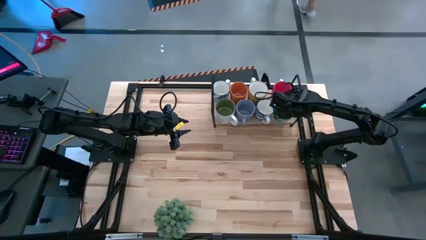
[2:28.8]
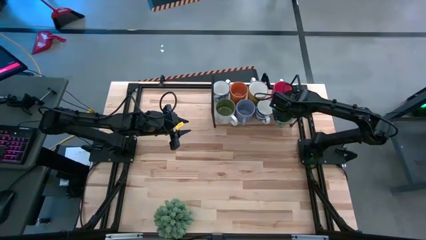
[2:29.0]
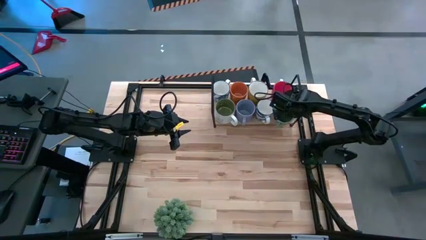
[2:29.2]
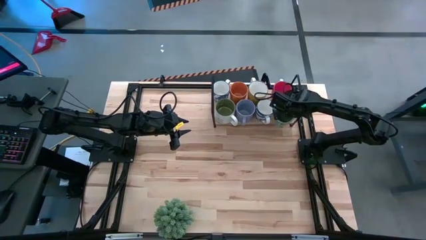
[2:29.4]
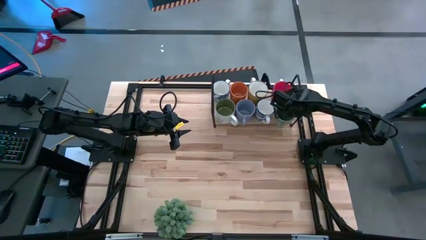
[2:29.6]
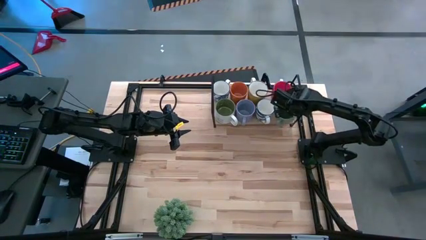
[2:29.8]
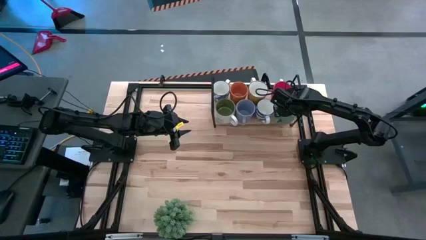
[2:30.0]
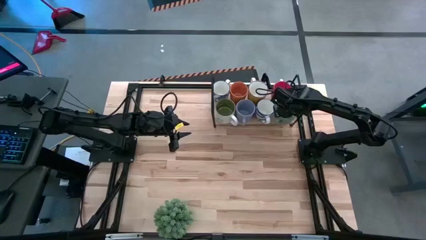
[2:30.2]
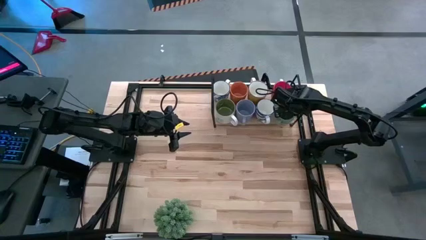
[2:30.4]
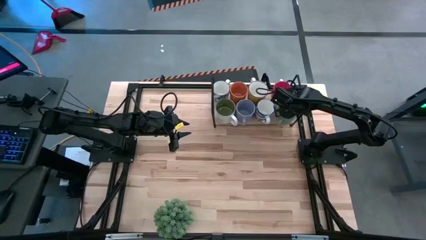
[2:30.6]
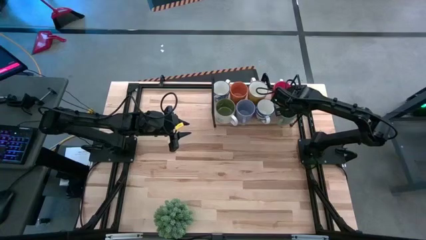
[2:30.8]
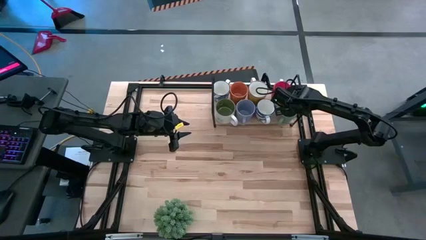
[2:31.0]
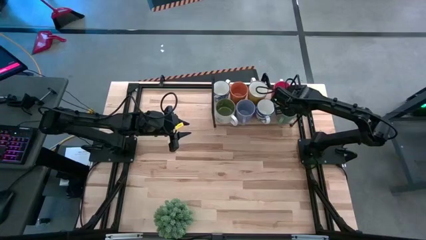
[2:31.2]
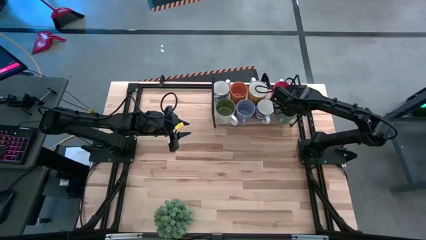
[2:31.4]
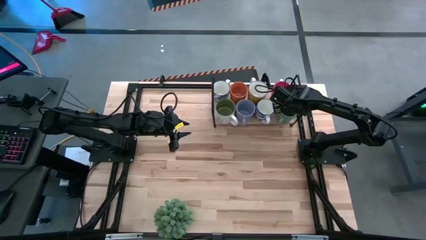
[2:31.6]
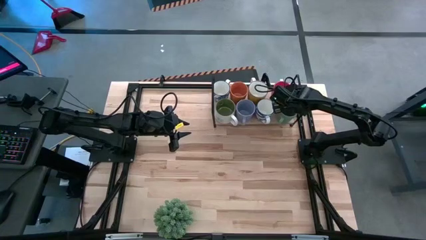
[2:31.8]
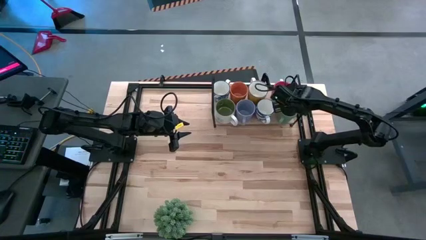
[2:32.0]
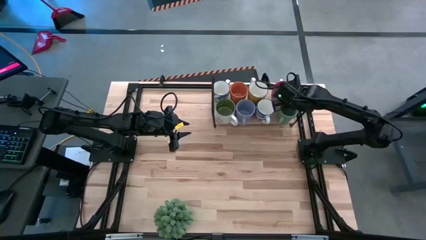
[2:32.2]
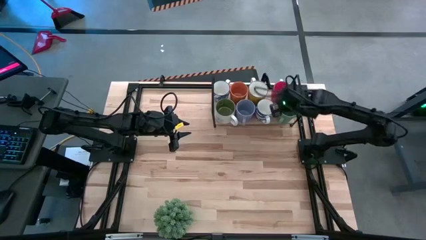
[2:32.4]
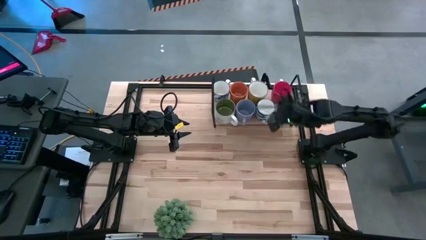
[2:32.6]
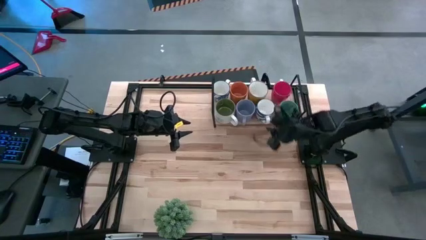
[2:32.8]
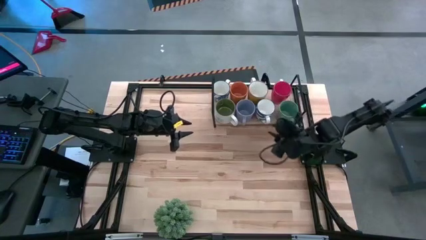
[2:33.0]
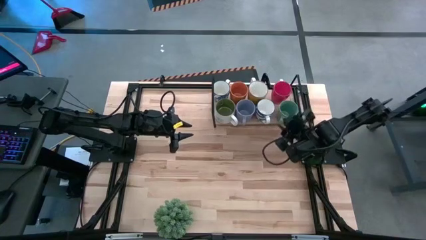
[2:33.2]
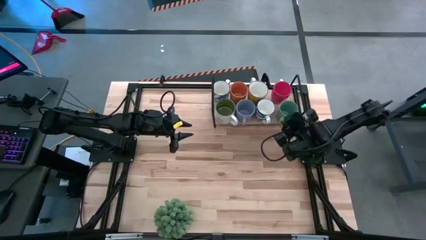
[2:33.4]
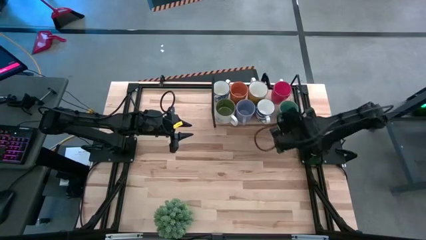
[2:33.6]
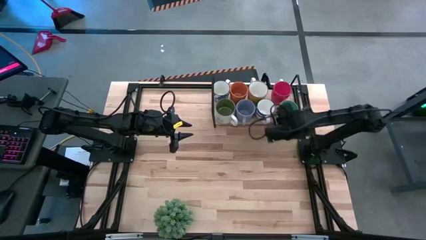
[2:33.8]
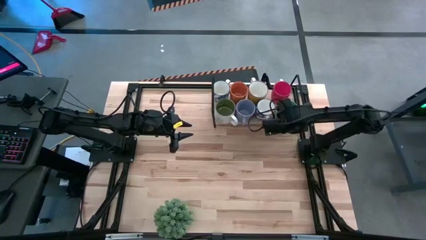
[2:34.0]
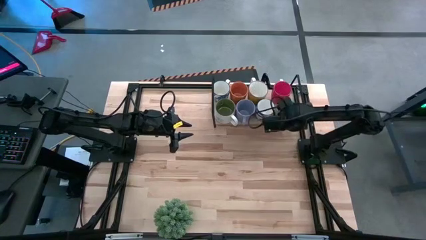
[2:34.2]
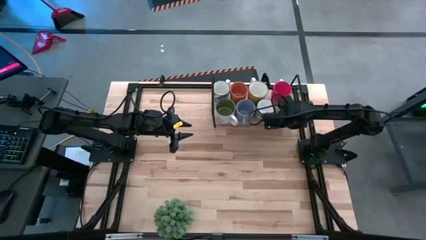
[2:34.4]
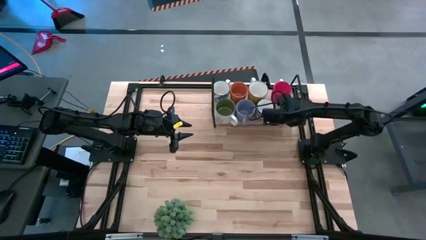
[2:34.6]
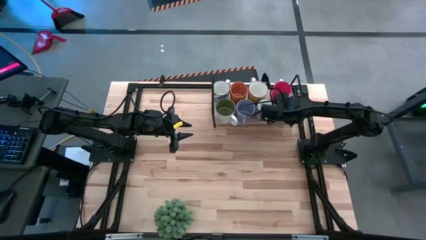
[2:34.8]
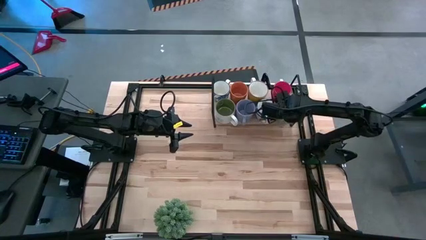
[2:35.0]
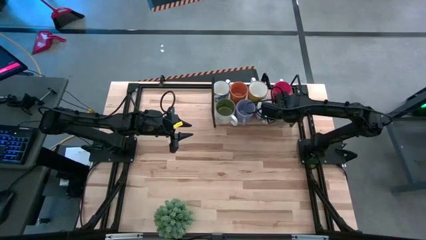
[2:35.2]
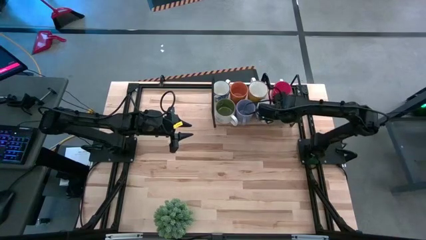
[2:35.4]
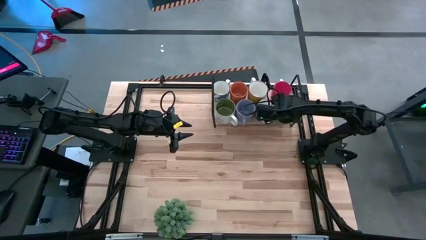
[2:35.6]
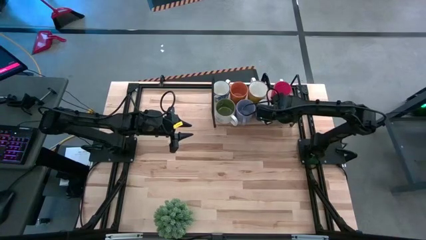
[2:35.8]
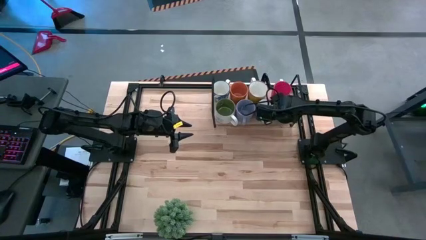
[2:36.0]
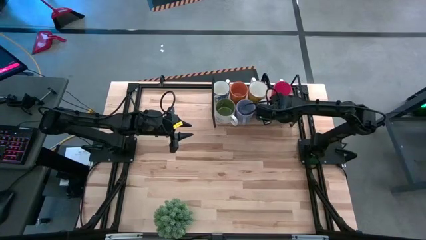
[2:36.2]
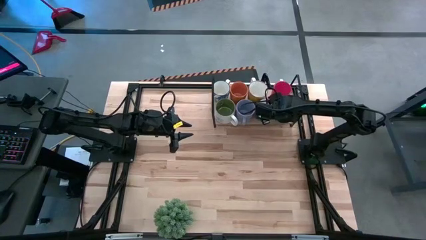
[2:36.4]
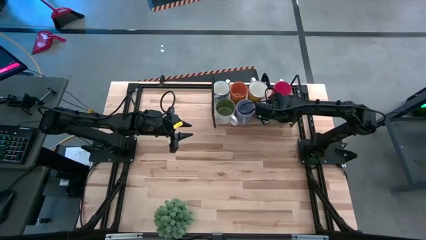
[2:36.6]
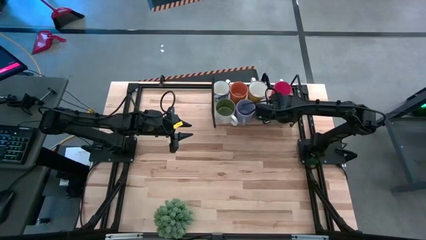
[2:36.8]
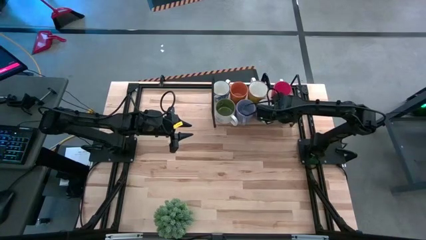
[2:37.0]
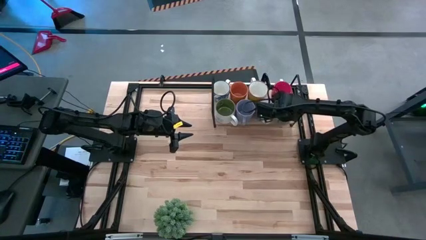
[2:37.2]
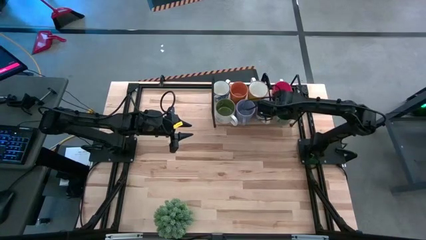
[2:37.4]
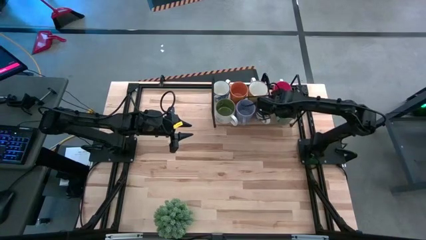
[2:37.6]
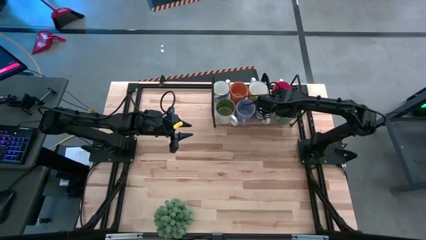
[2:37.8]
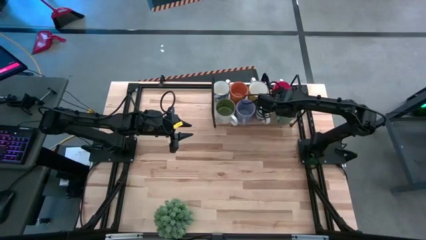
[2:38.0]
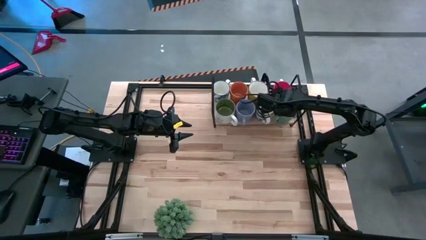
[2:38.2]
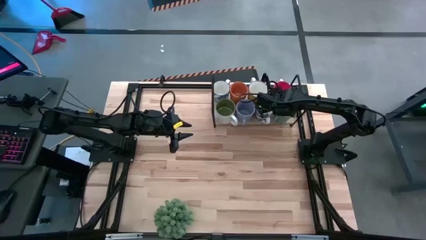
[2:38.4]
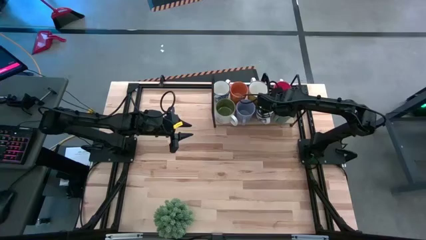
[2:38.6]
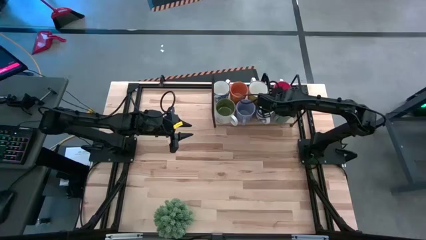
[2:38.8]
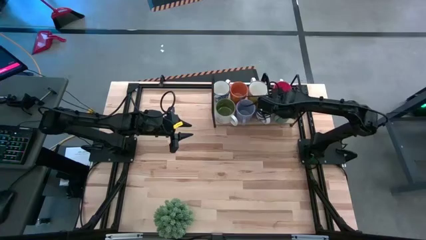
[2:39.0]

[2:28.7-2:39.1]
Task: Place coffee mugs
Put the green mug on the shelf

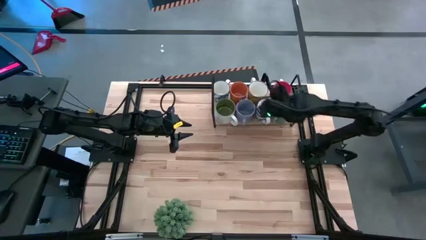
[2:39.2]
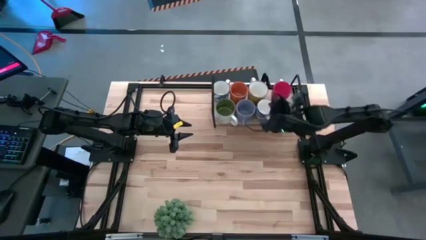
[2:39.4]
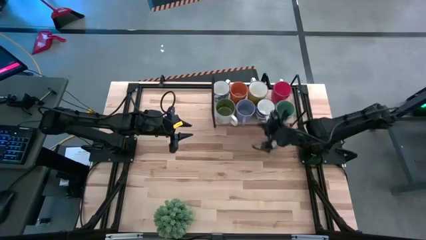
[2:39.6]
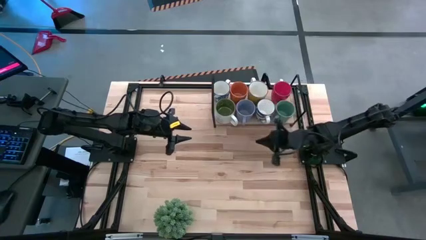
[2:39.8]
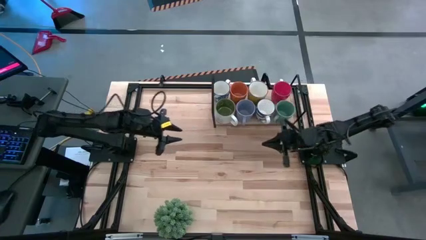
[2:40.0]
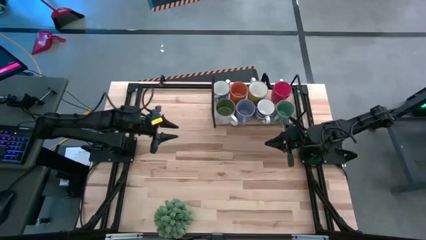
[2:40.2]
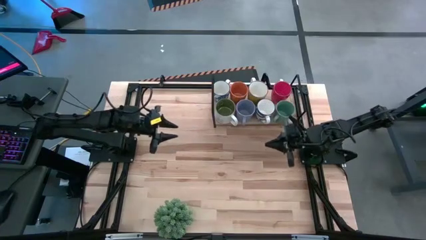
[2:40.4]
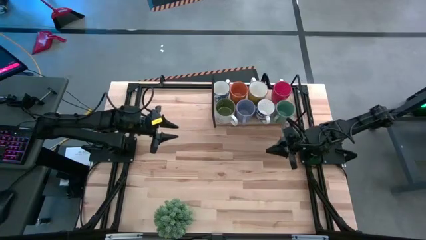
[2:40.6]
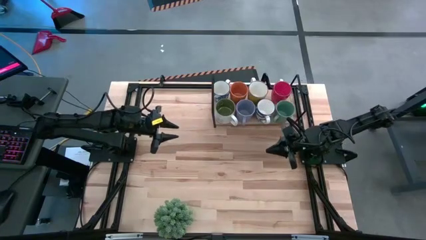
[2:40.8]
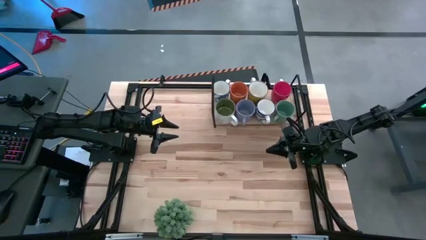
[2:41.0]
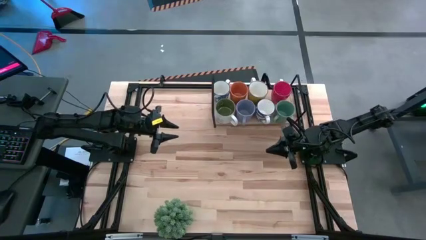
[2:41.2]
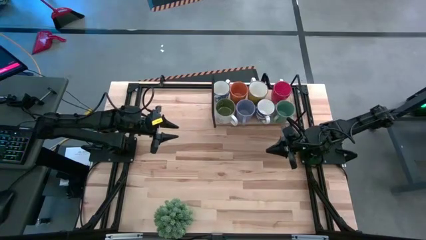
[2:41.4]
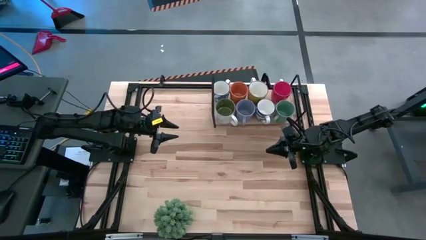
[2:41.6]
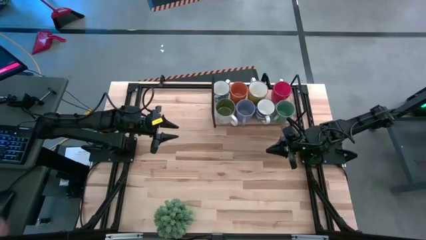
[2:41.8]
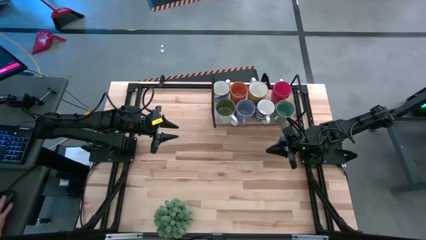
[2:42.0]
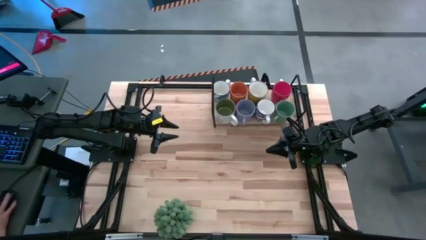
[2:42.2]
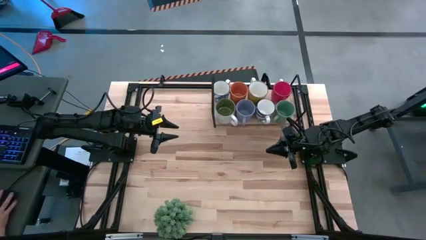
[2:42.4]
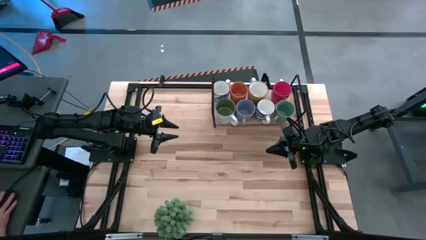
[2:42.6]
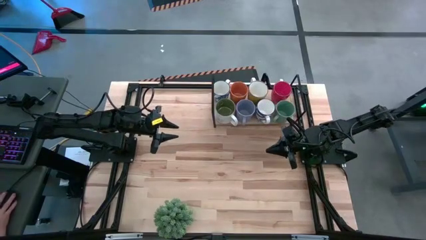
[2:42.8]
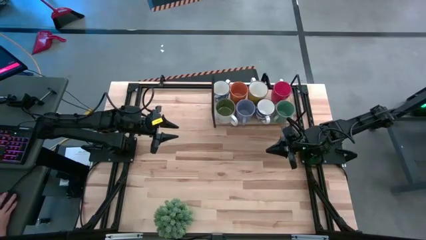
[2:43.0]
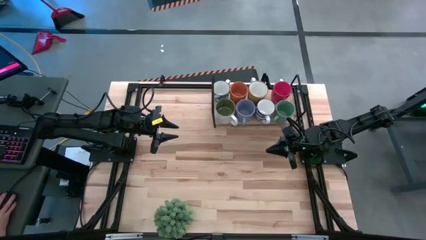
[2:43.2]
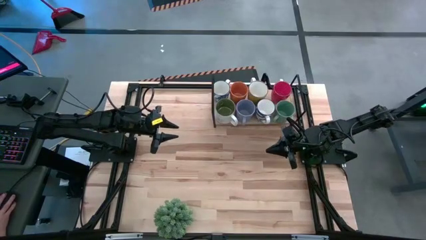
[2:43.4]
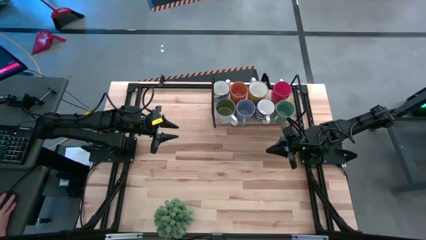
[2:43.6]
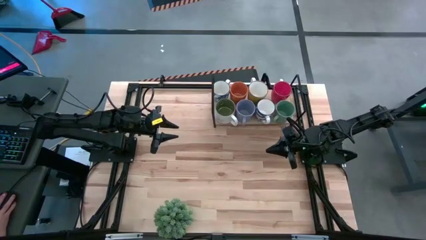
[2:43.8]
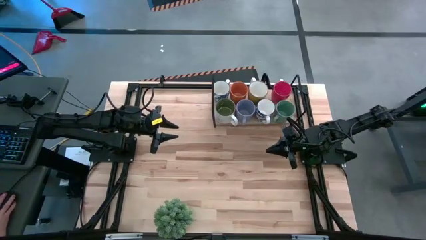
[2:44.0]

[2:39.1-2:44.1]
Return to Home Position

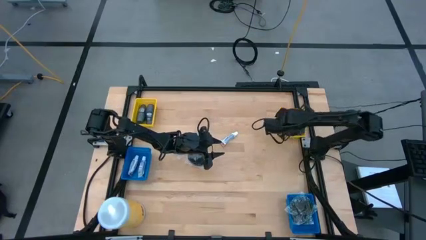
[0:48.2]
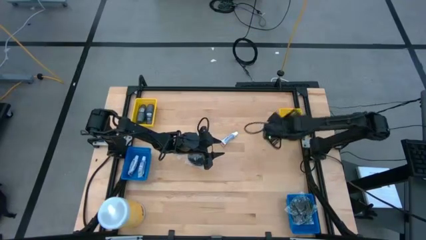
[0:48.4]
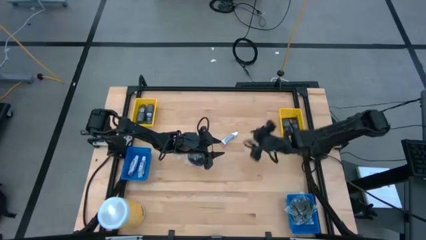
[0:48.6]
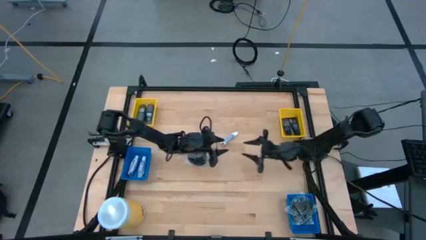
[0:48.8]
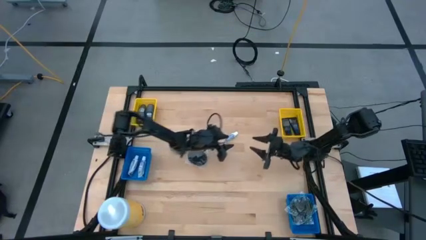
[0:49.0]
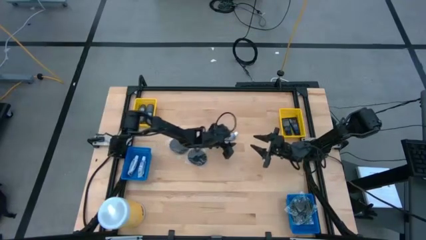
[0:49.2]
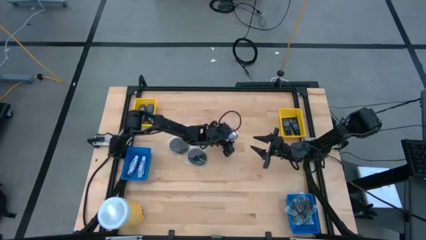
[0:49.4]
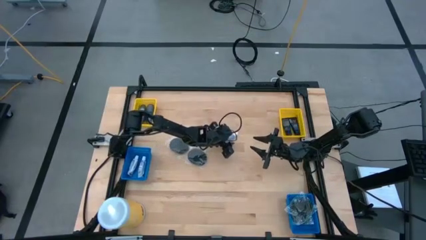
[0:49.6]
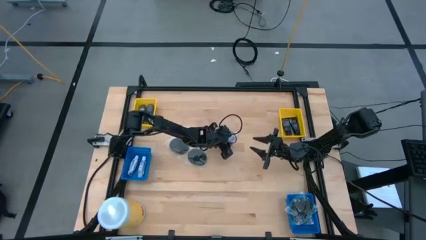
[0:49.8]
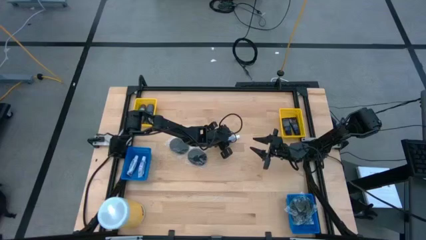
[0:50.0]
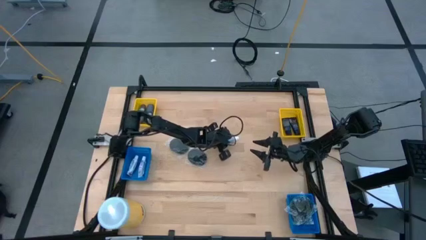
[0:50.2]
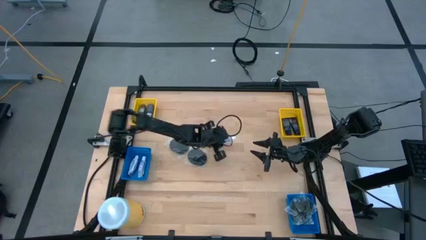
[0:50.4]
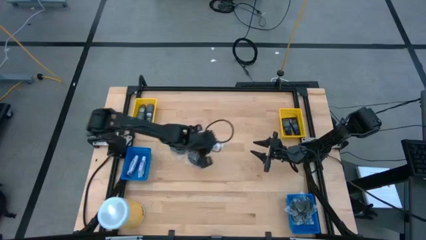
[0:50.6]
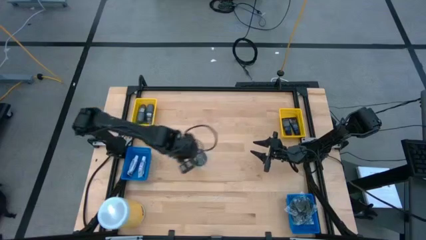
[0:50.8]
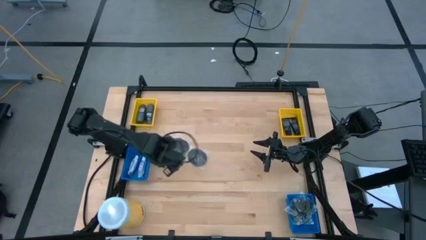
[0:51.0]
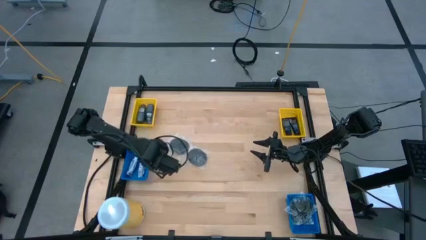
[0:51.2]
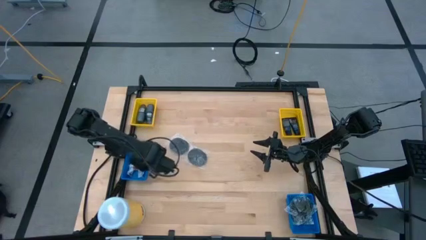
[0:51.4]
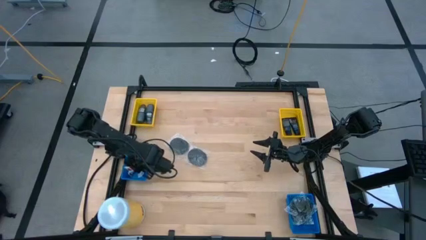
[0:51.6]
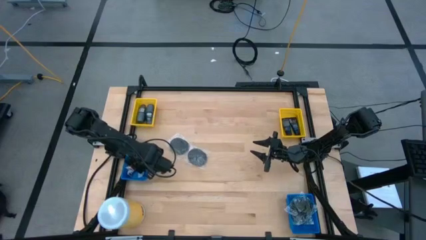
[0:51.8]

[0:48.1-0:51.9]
Task: Pick & Place Travel size toiletries
Put the white toothpaste into the left blue basket
